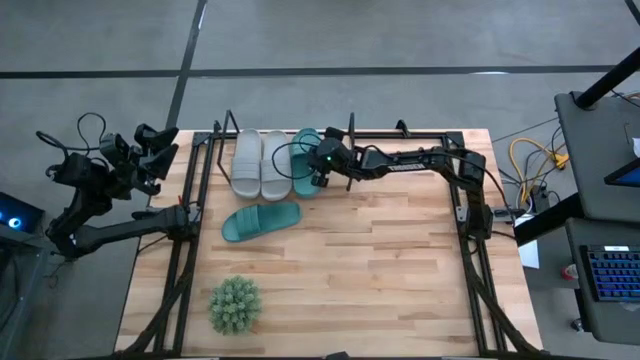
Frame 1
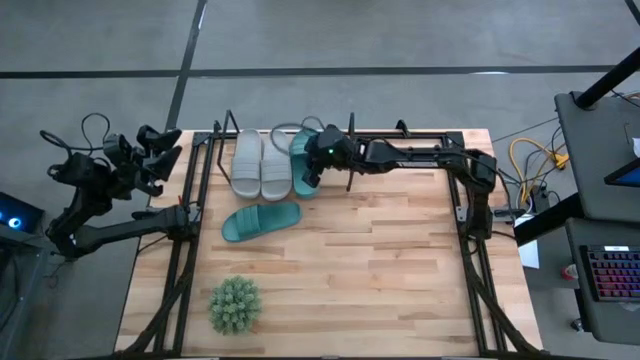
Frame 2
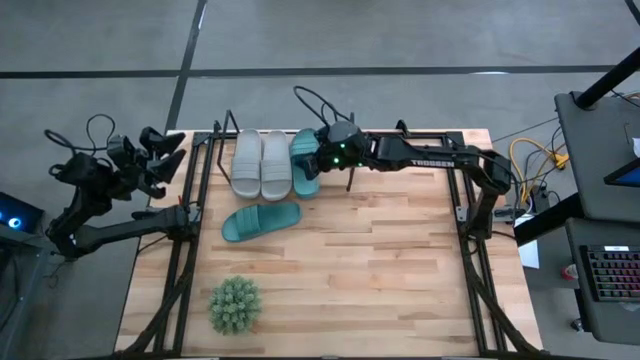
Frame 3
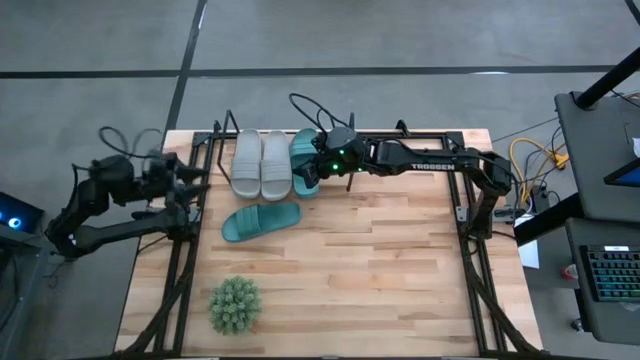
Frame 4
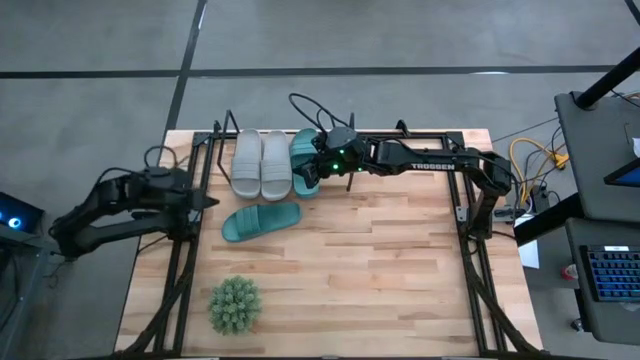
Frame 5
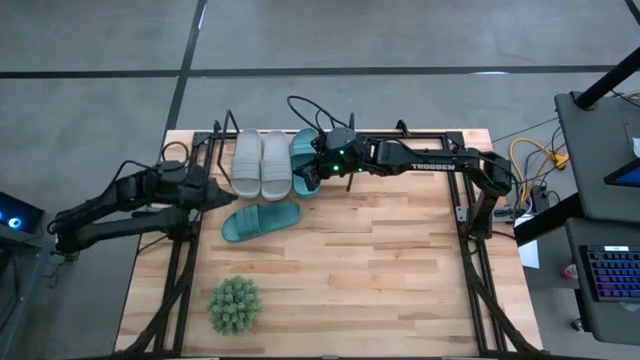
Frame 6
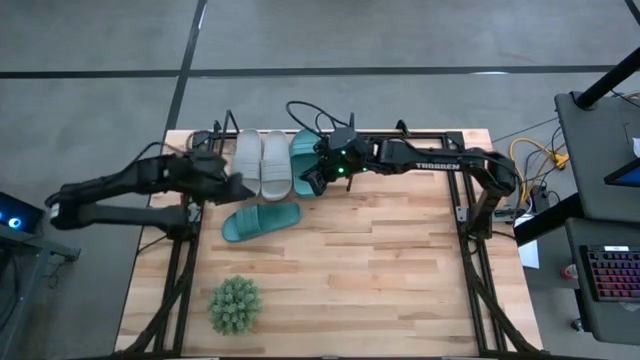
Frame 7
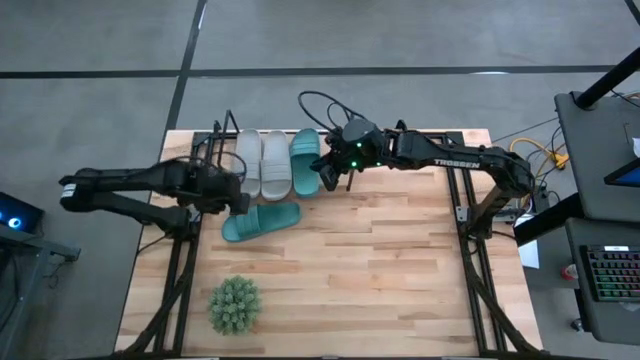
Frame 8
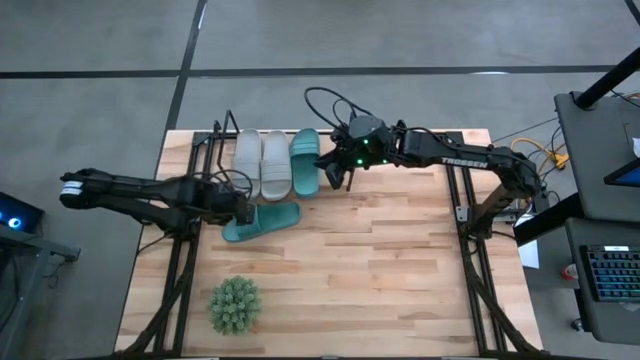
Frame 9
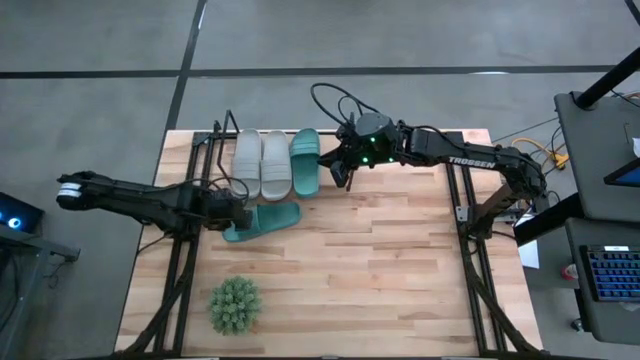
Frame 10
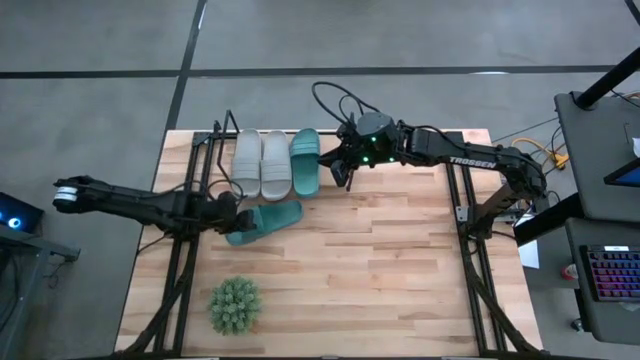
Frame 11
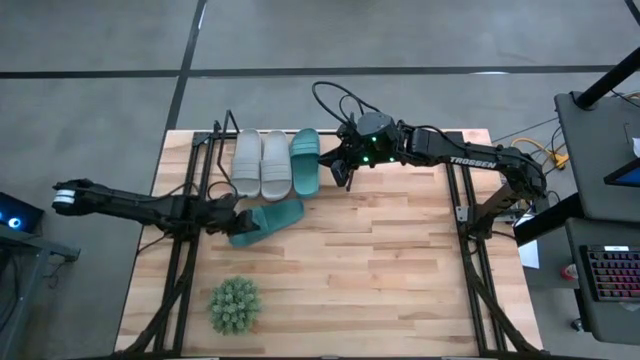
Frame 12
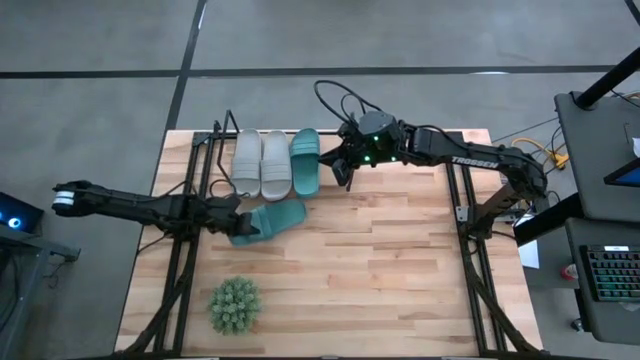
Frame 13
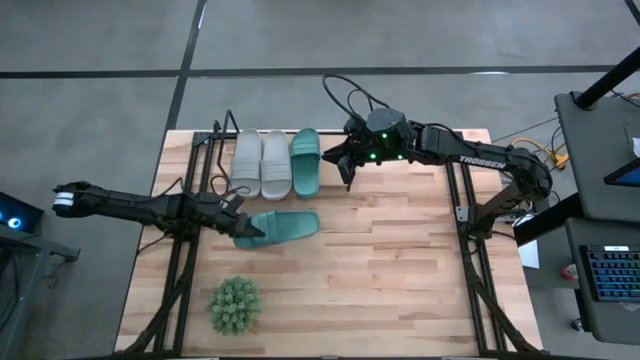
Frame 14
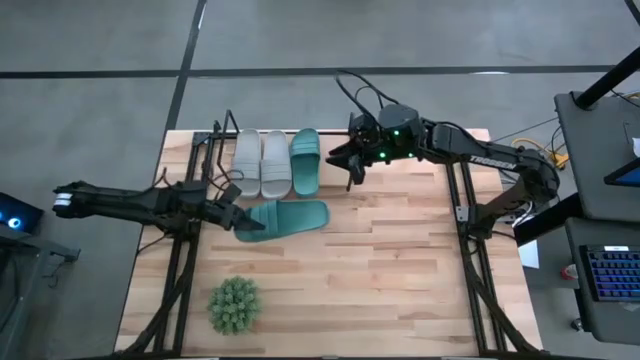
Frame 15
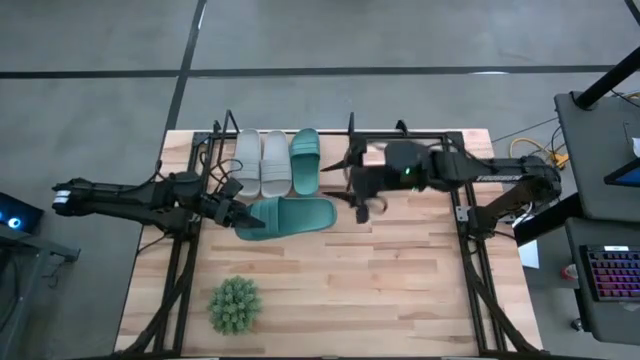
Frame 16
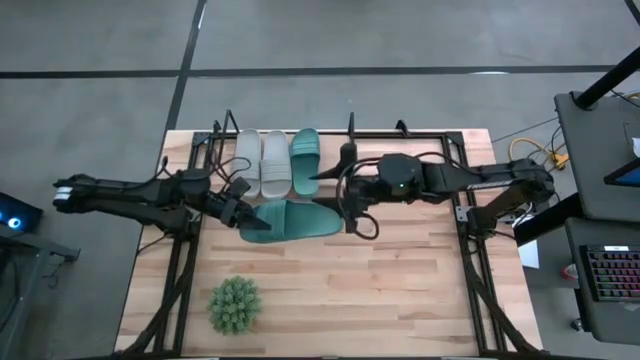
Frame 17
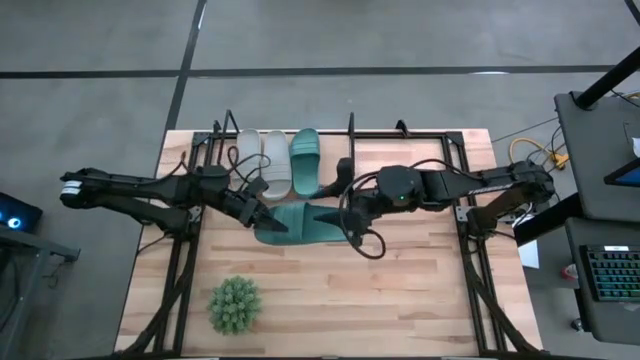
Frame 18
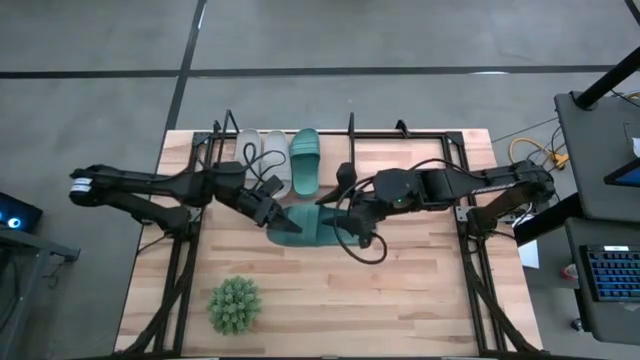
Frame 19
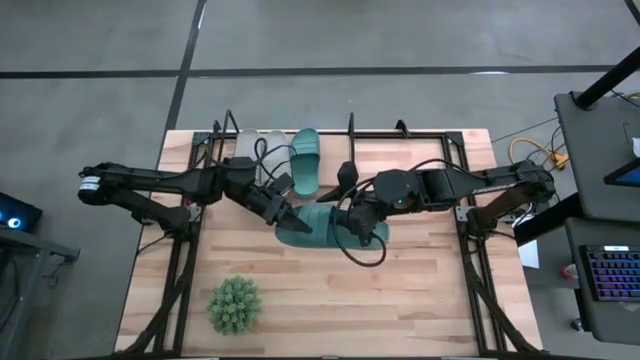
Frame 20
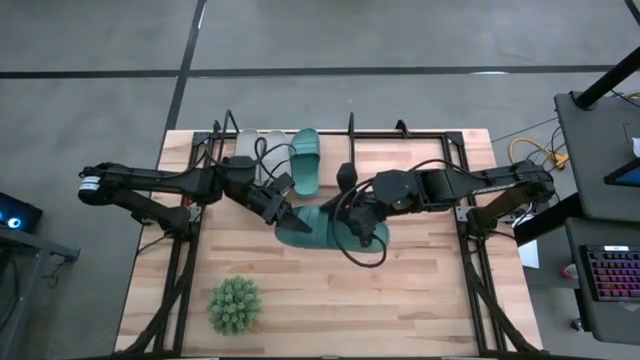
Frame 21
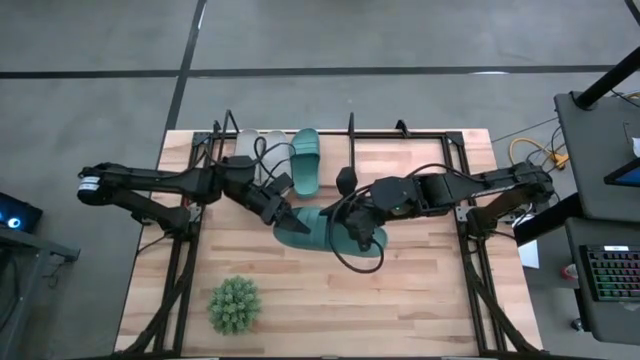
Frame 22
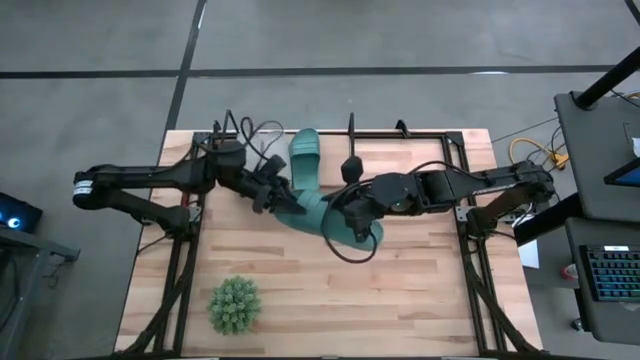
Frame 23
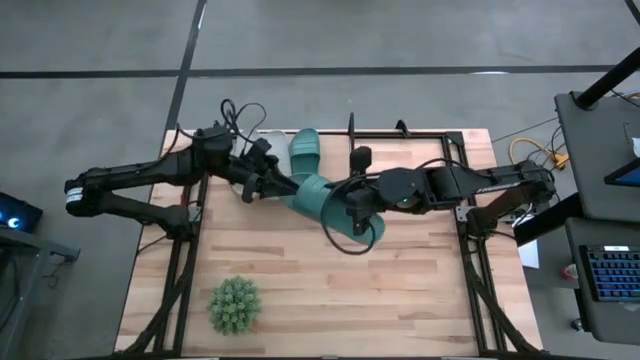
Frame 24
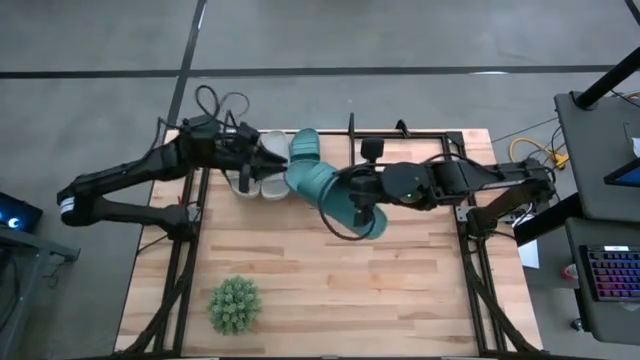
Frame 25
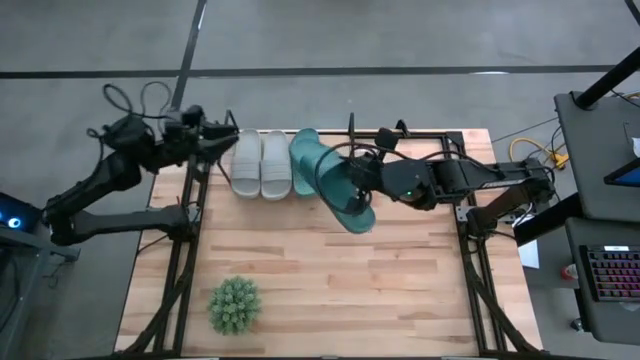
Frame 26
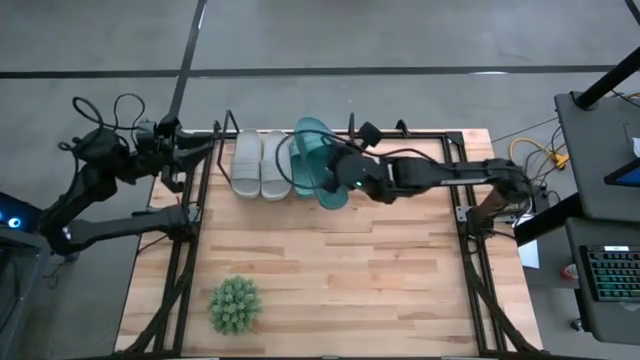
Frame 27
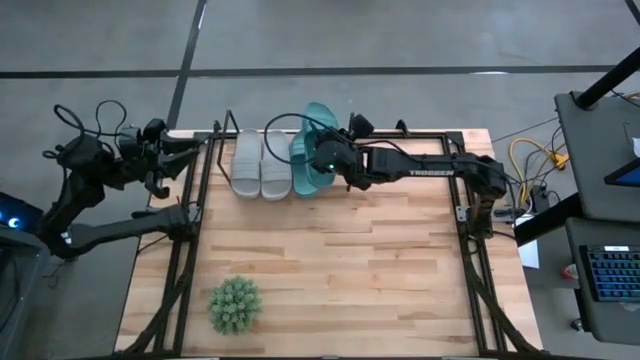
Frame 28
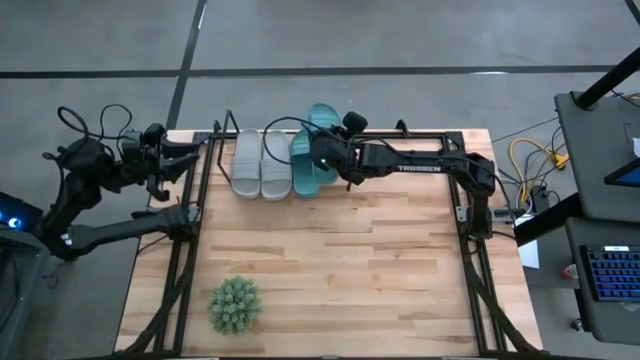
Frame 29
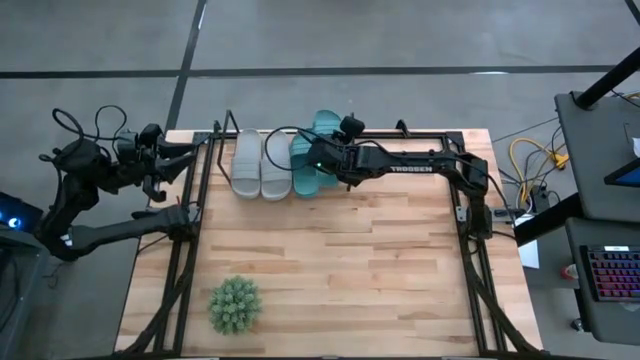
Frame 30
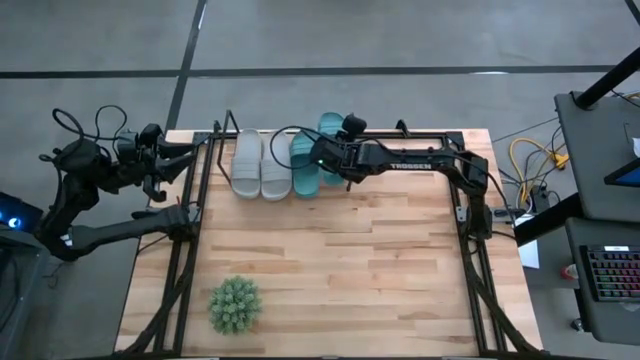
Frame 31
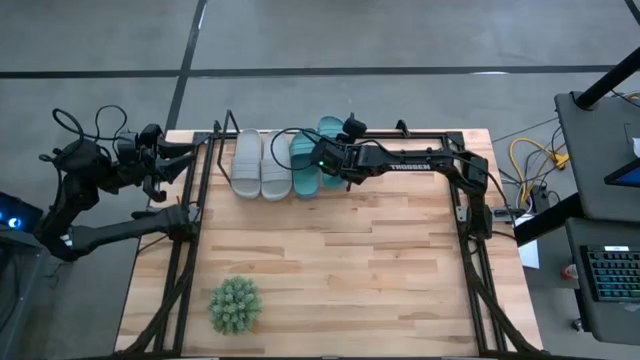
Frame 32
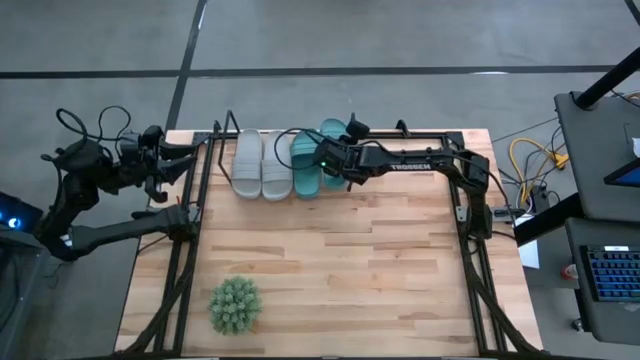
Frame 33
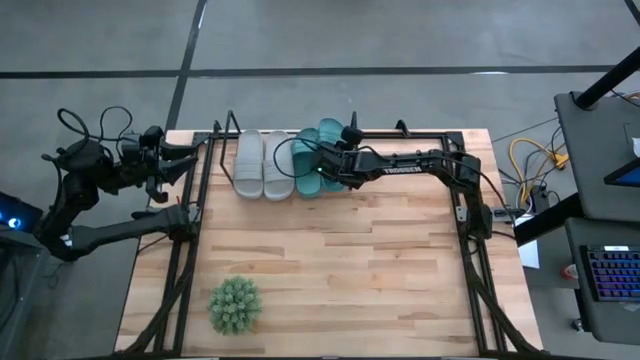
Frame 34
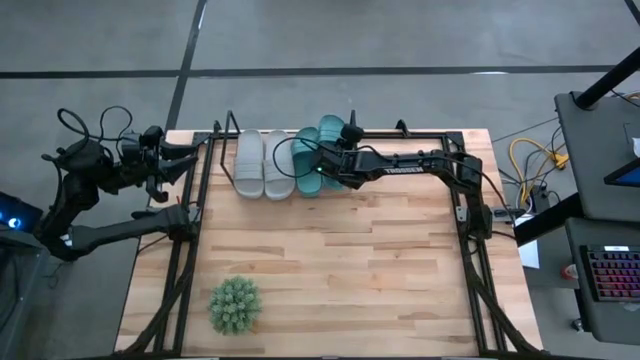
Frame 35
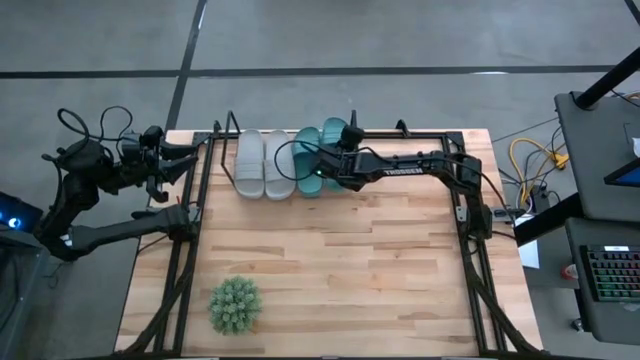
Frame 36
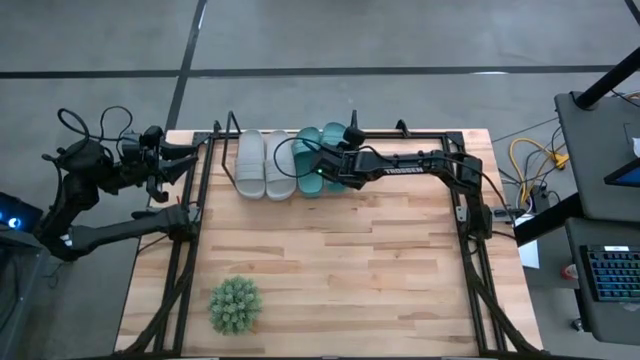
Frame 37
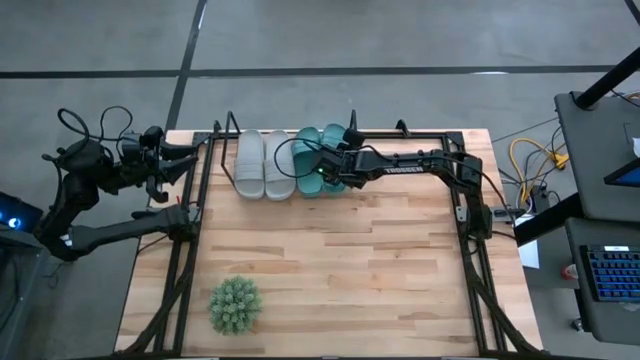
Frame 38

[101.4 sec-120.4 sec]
Task: Pick and place slides into the shelf
Put the green slipper on the shelf

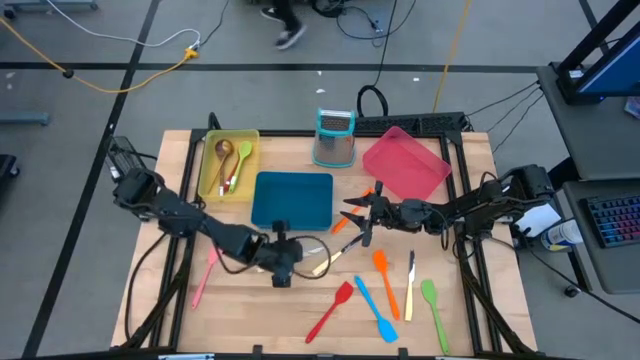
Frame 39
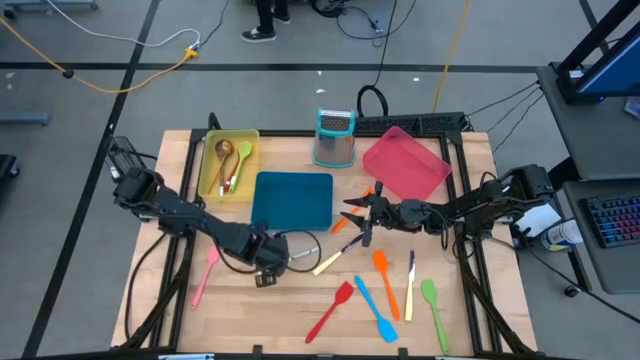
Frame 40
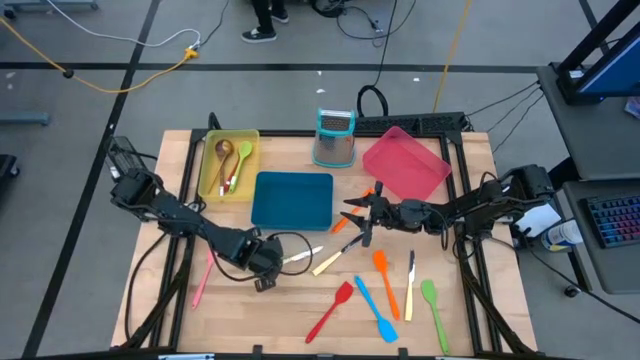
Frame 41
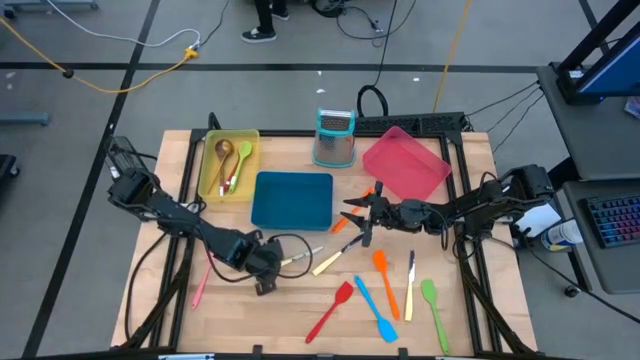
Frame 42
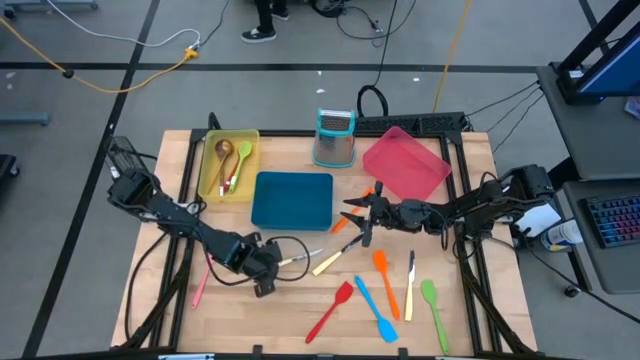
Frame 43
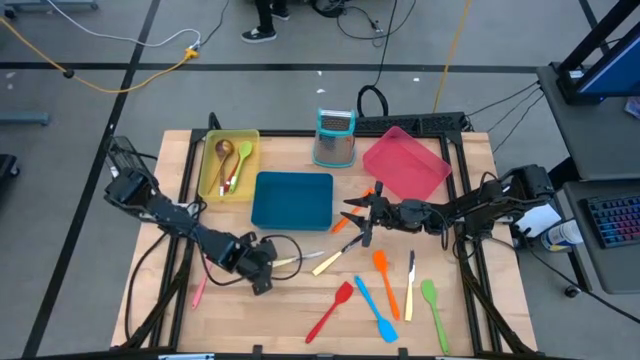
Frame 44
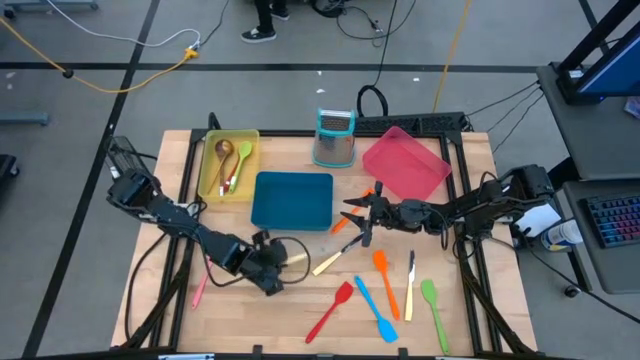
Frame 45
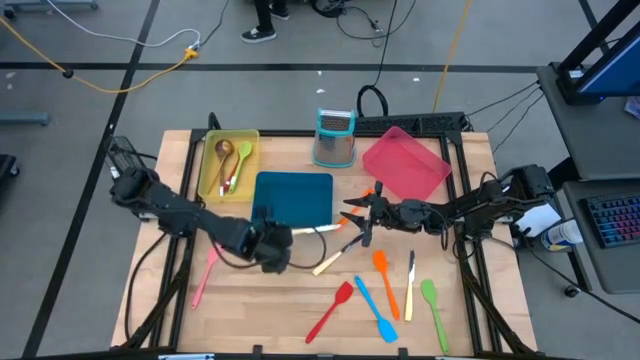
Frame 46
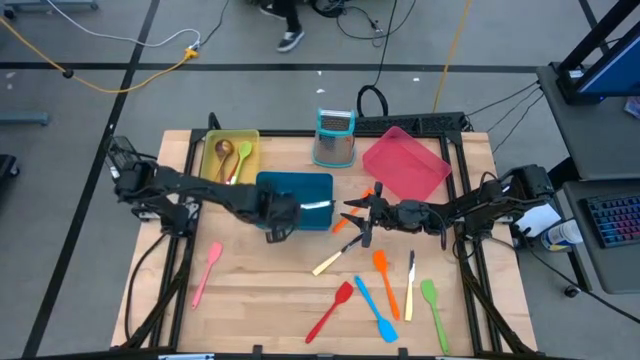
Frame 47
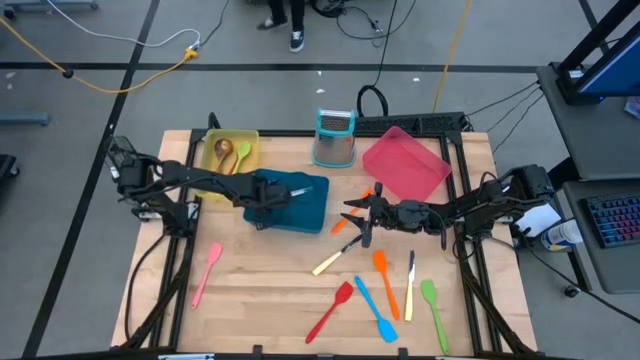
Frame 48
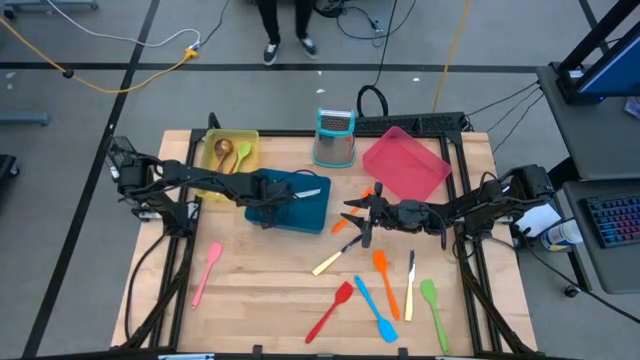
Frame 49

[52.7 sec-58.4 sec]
Task: Pick & Place Kitchen Items
Put the top left yellow table knife into the blue bin
